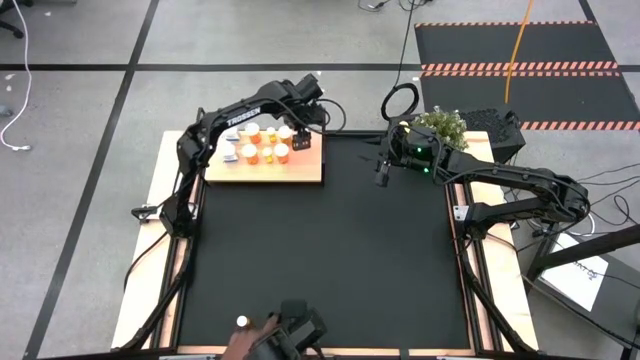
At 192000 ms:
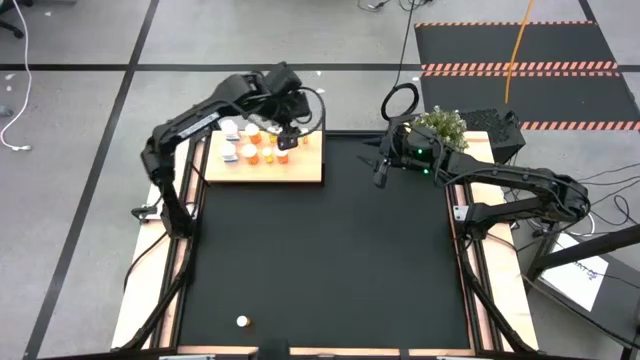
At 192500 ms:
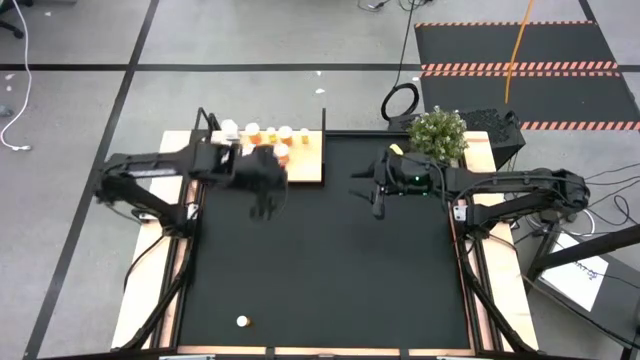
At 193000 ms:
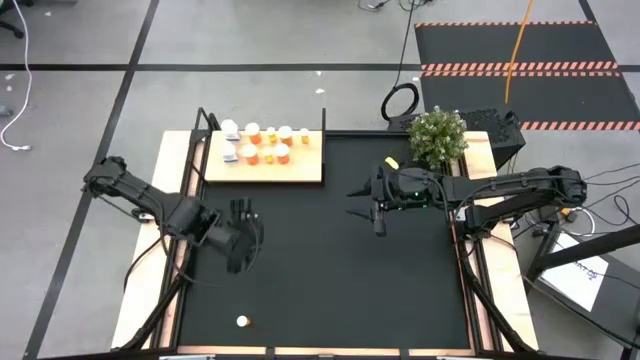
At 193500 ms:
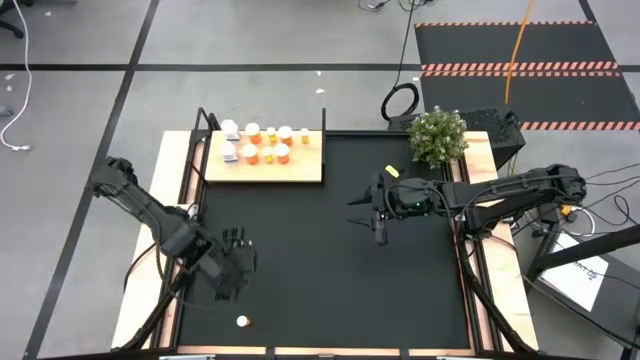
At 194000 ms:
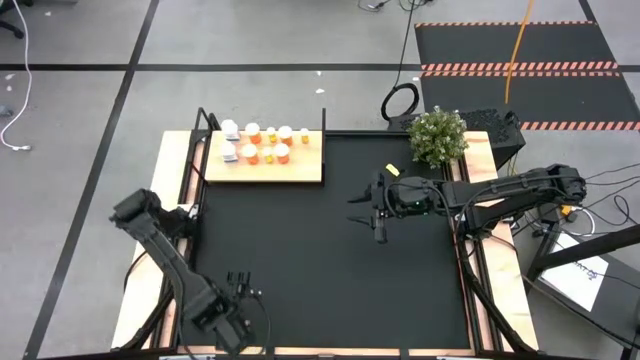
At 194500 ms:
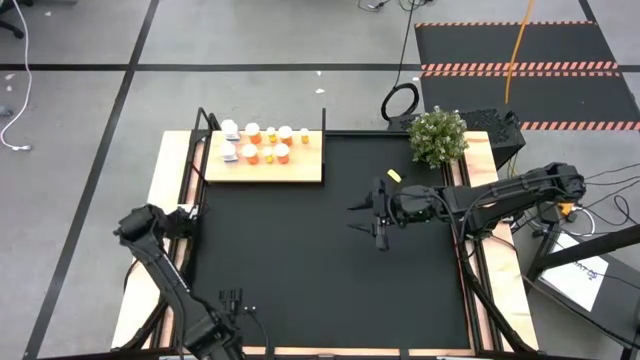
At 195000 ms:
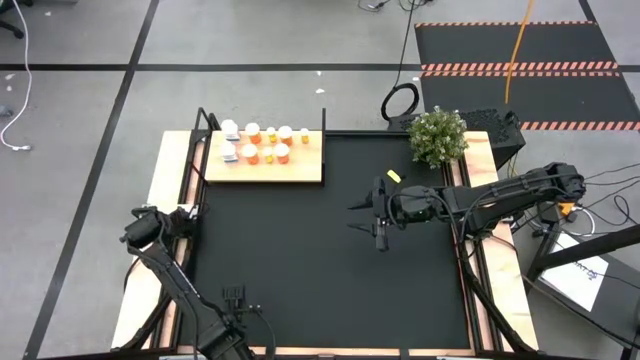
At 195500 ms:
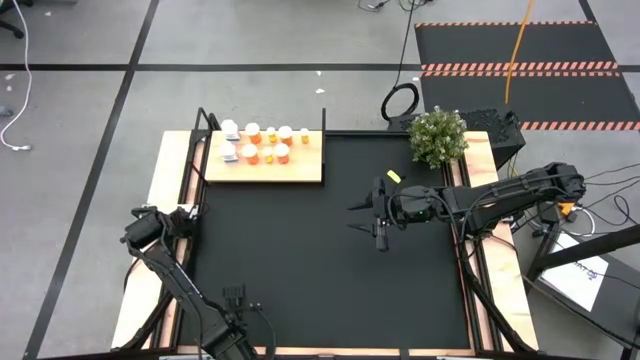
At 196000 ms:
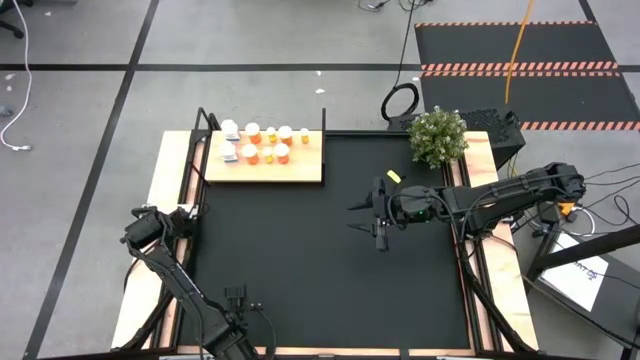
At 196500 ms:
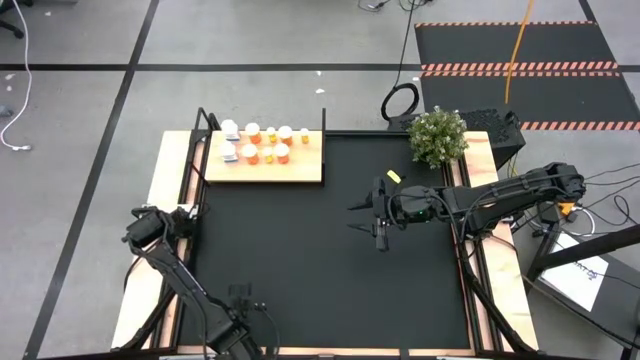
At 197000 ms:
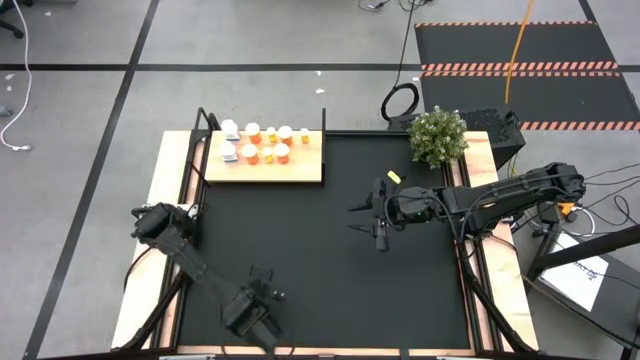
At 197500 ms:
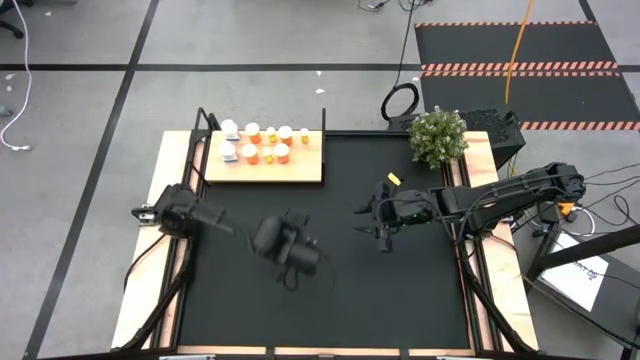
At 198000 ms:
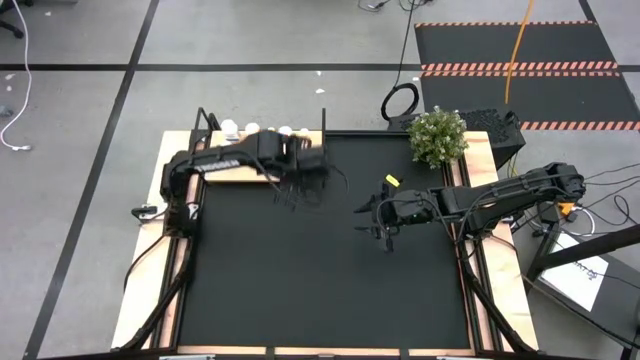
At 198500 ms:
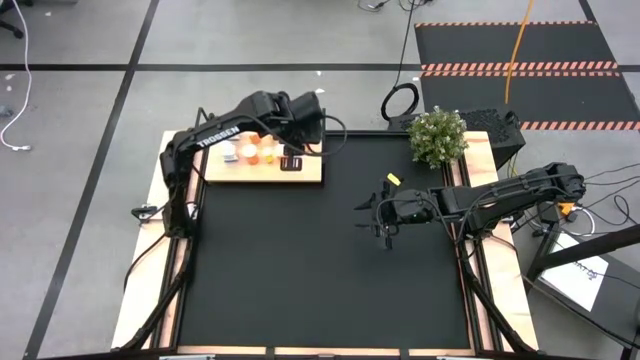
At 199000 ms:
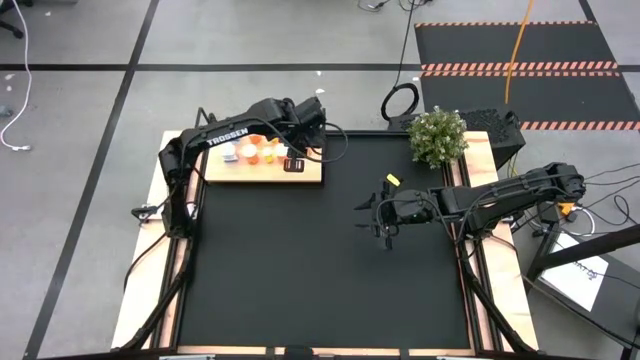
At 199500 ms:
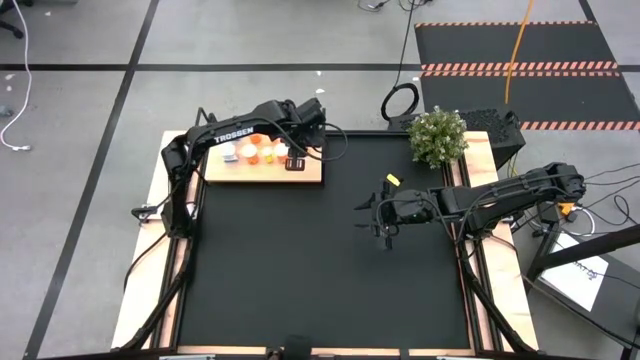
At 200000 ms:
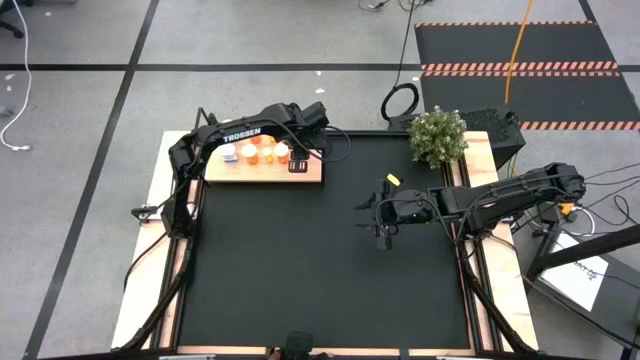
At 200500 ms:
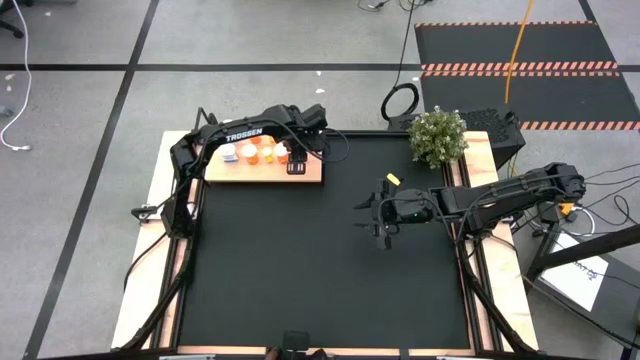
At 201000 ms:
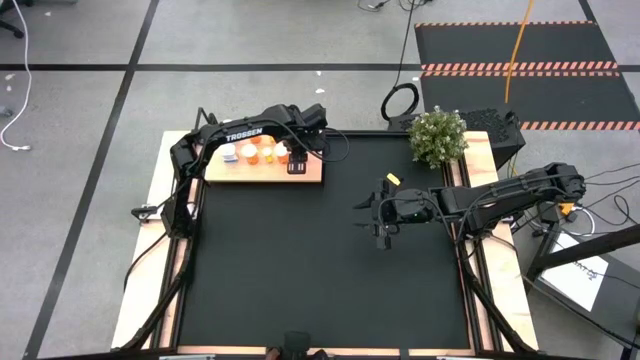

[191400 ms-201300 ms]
Task: Pick and place medicine bottles onto shelf by color
Put the small orange pill bottle aligned with the other small pill bottle

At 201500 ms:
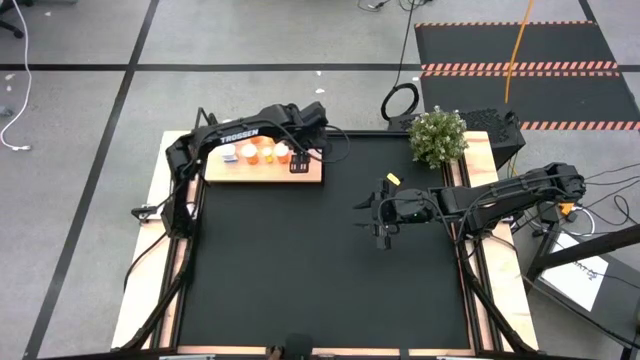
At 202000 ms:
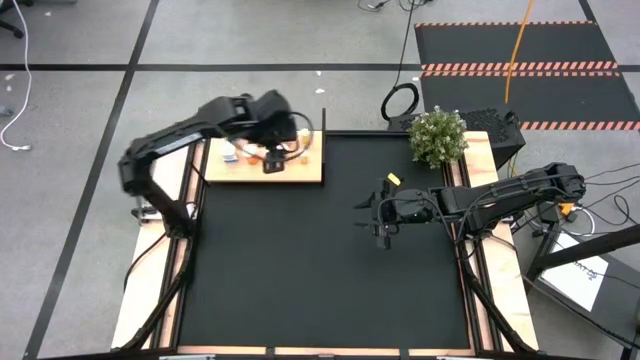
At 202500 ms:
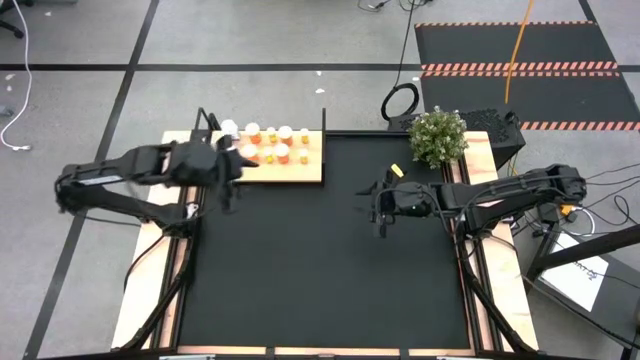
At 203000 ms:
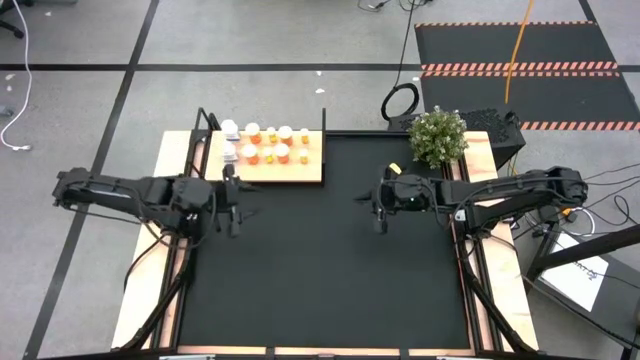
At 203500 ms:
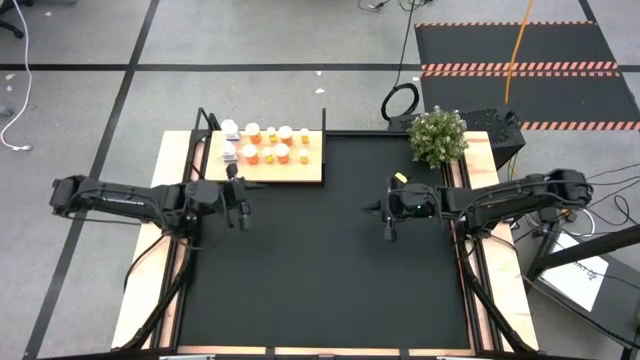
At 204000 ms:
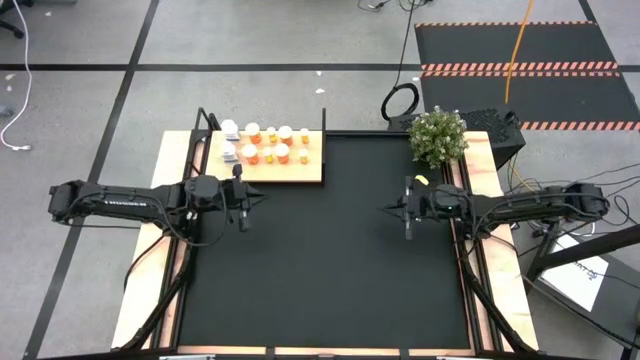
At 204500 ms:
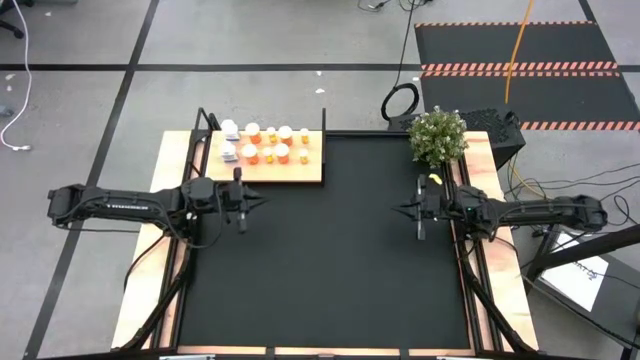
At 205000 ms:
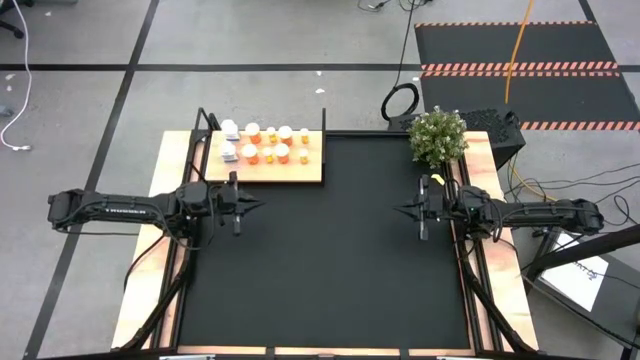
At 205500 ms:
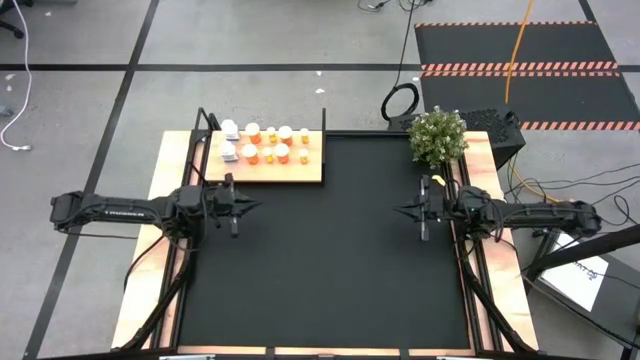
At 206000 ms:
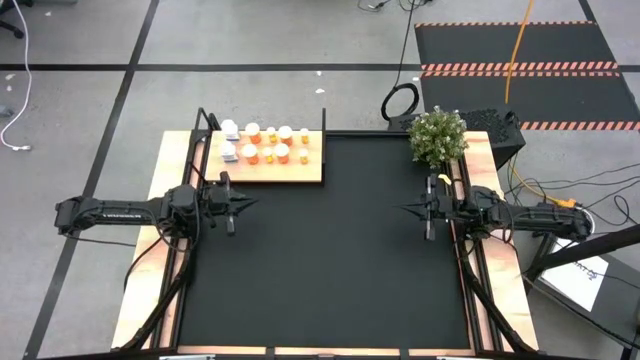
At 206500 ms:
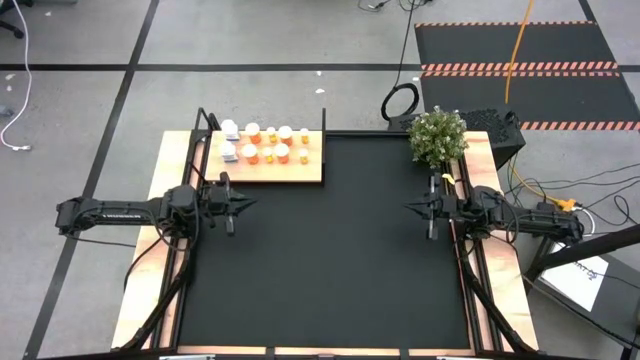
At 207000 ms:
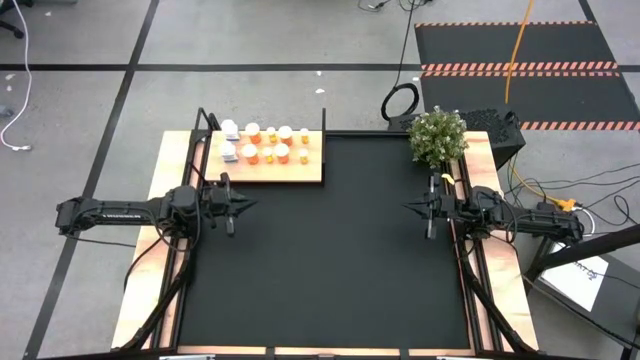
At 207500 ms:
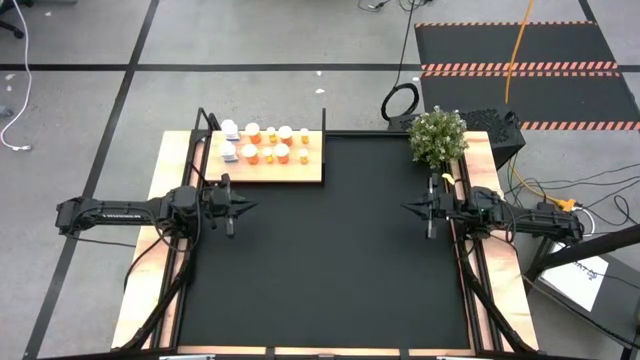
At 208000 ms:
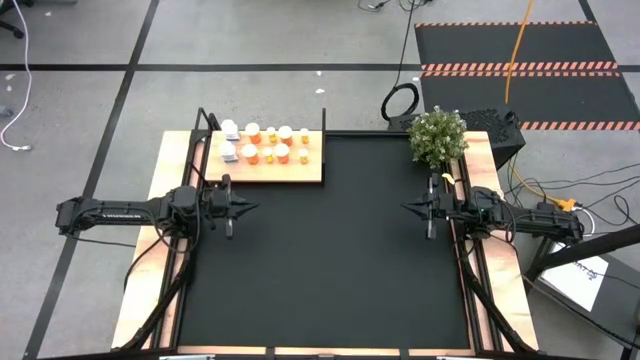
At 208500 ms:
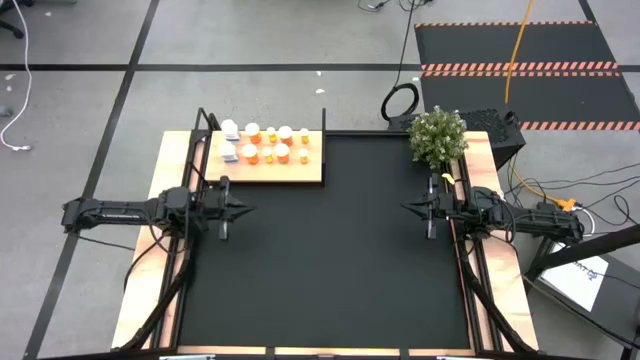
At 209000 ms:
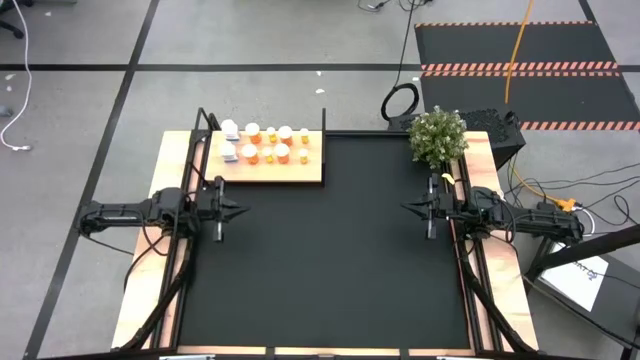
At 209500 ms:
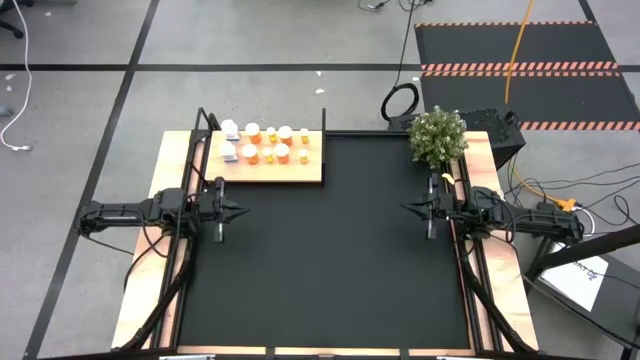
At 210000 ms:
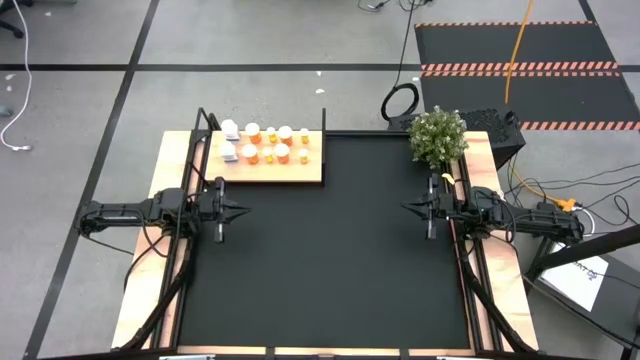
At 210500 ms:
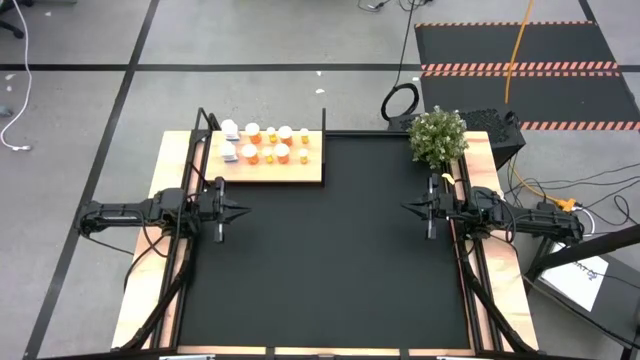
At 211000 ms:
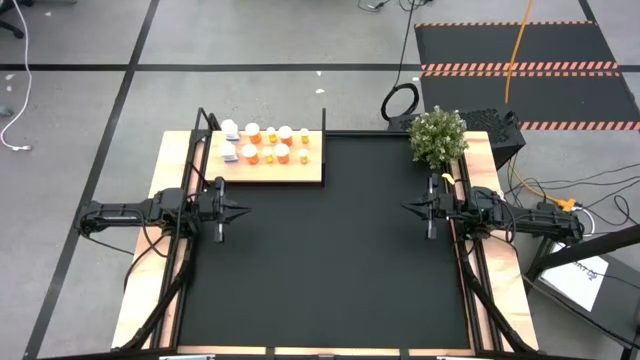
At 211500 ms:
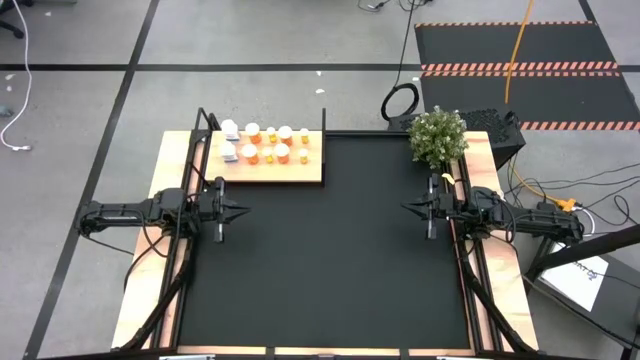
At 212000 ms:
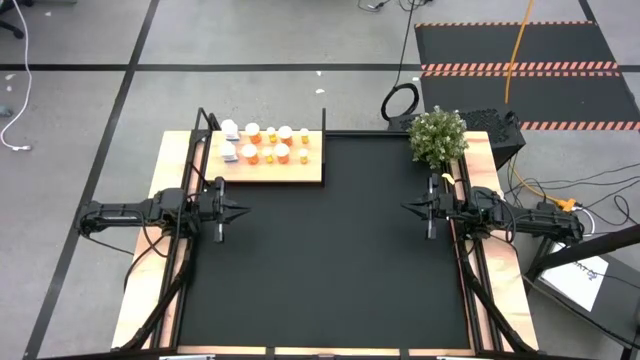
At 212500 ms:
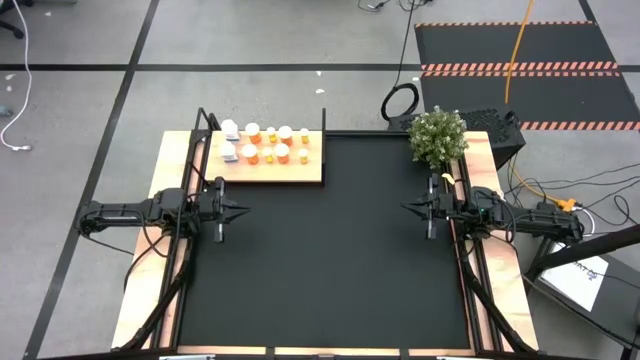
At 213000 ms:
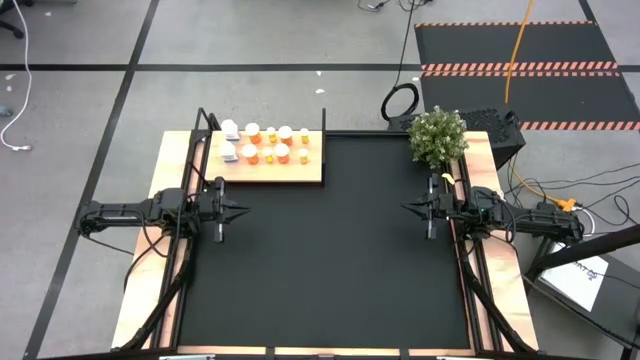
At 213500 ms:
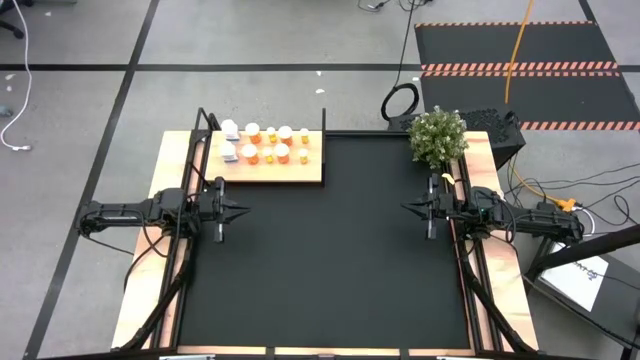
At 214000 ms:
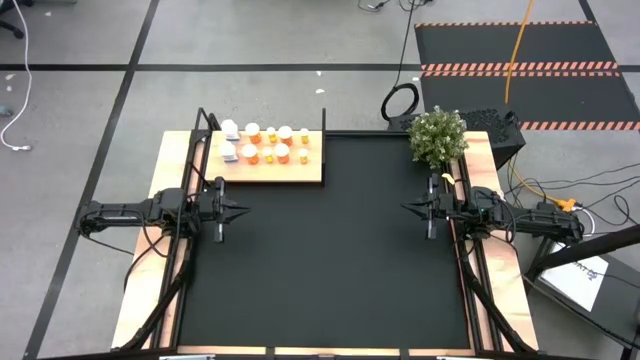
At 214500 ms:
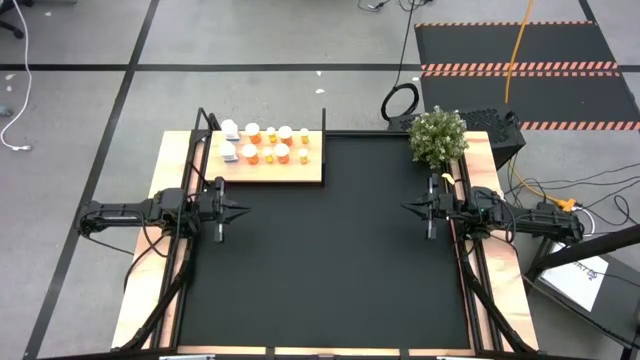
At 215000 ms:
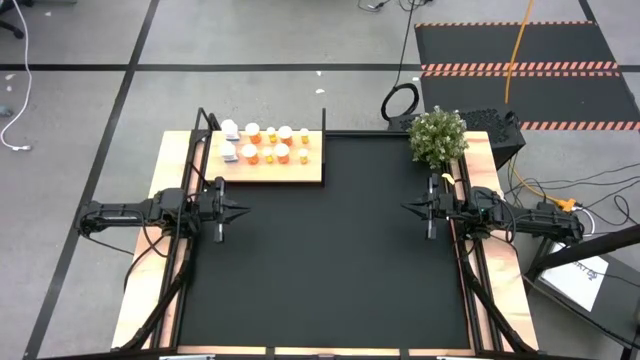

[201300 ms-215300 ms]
Return to Home Position
